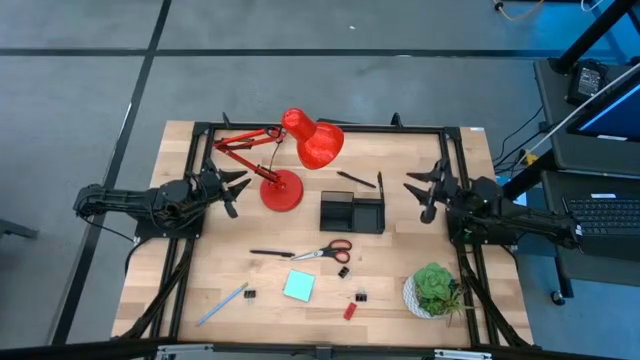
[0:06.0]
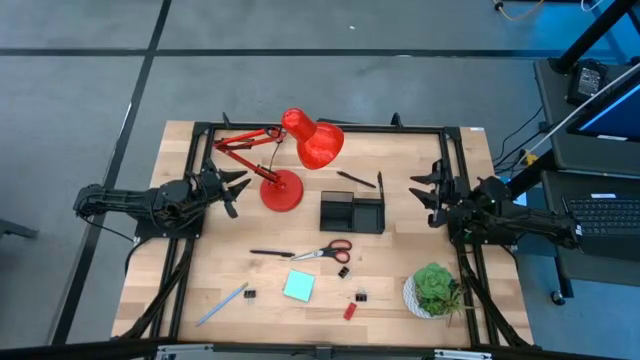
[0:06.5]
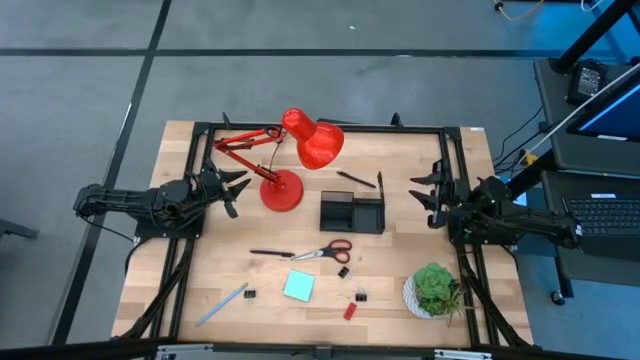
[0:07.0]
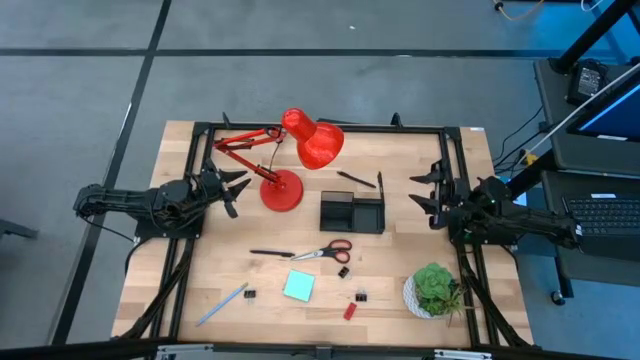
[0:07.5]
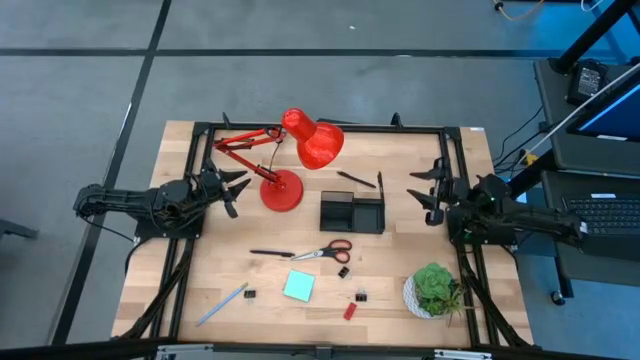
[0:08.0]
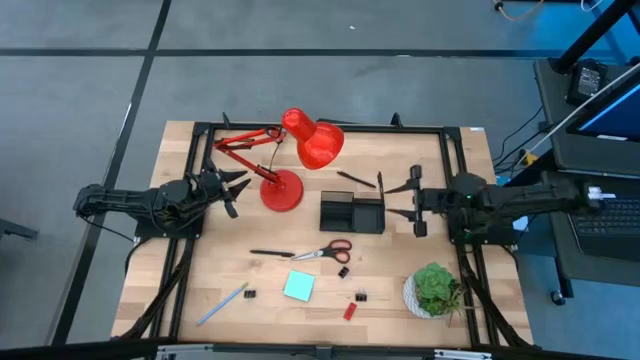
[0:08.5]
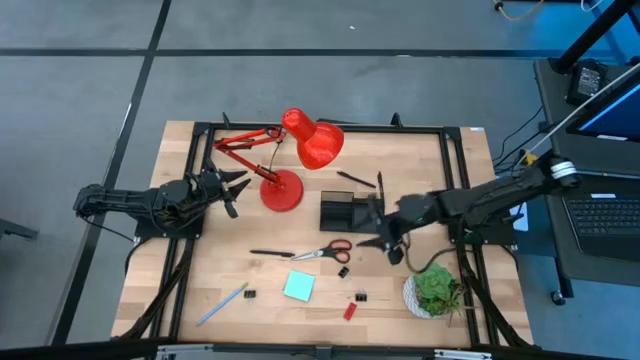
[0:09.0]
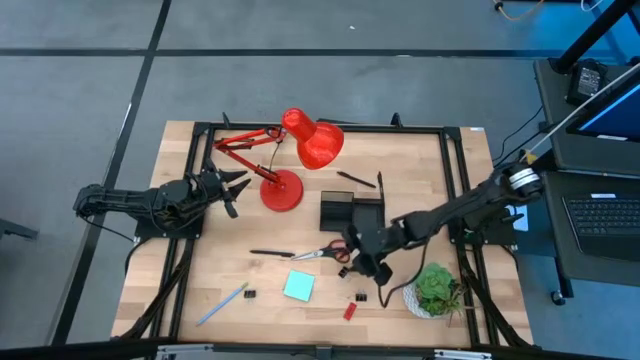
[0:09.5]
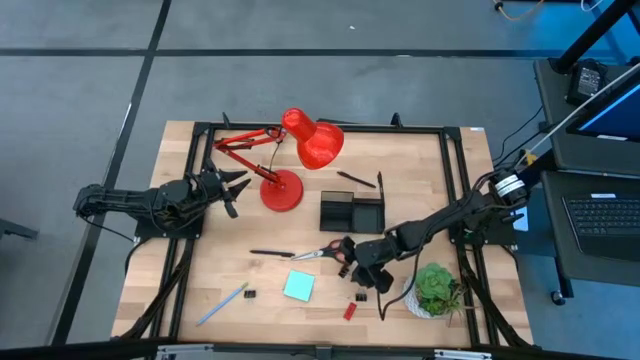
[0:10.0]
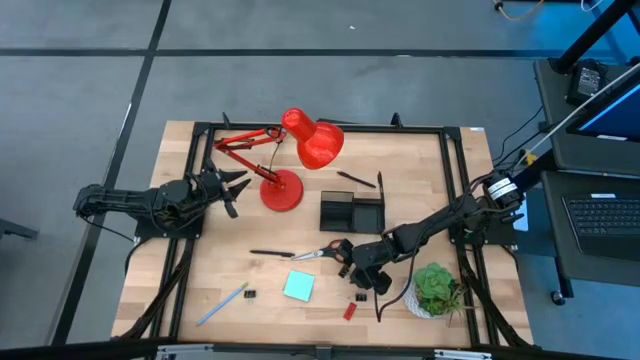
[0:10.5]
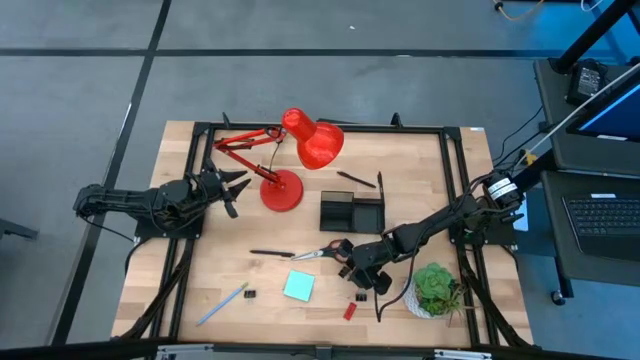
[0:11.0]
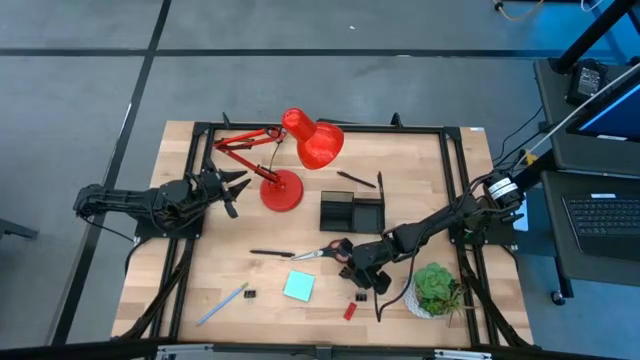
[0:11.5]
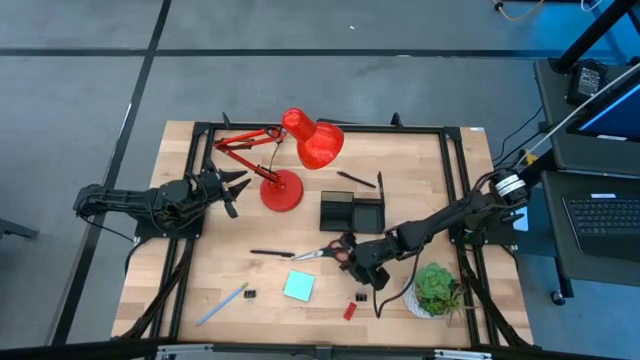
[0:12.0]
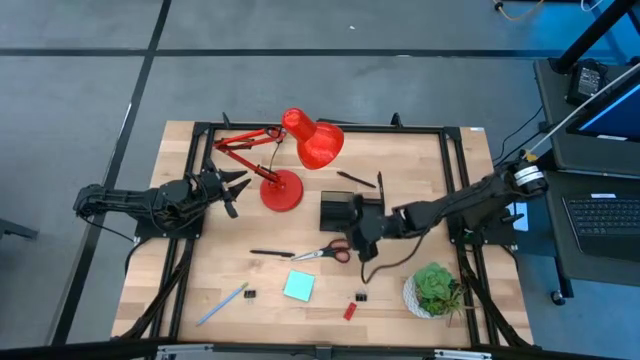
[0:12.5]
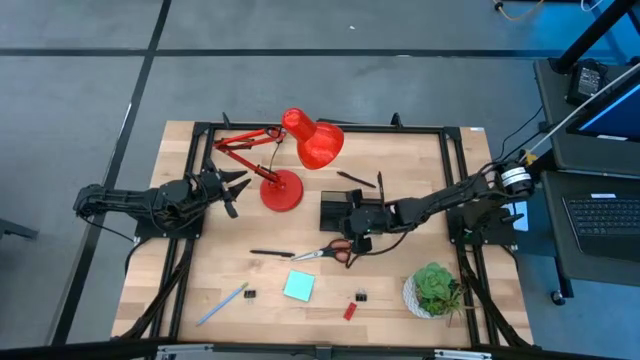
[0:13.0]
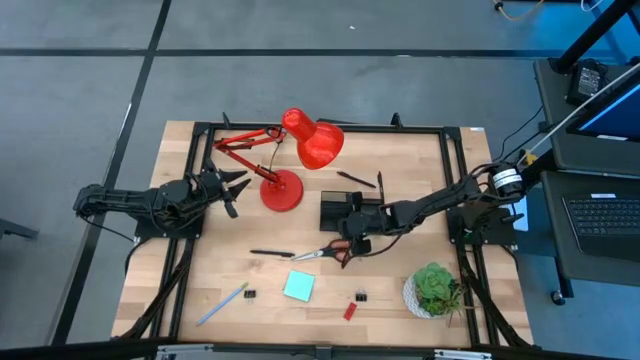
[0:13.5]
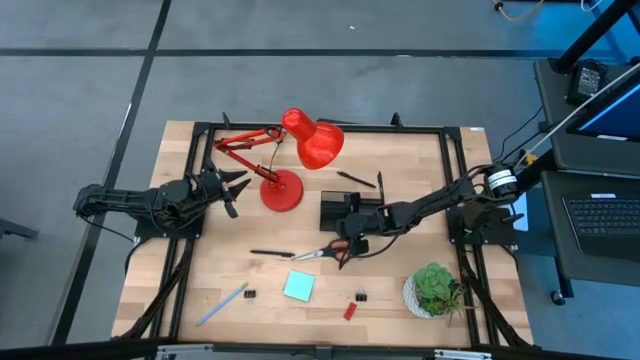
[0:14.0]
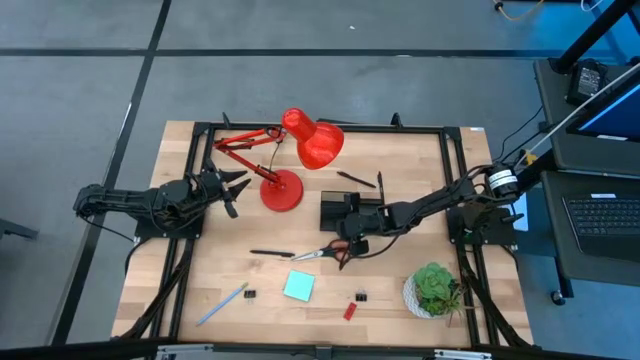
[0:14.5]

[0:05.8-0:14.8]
Task: Pick and place office supplies into organizer
Put the top left black binder clip into the black desk organizer

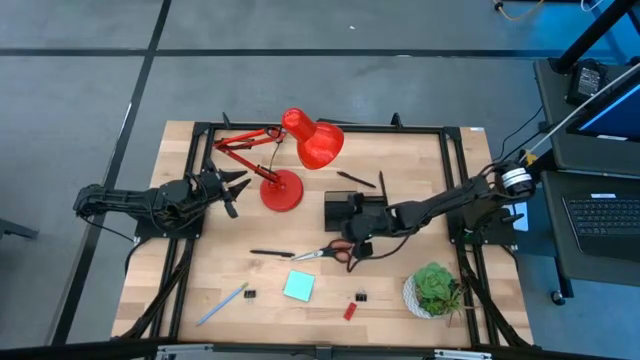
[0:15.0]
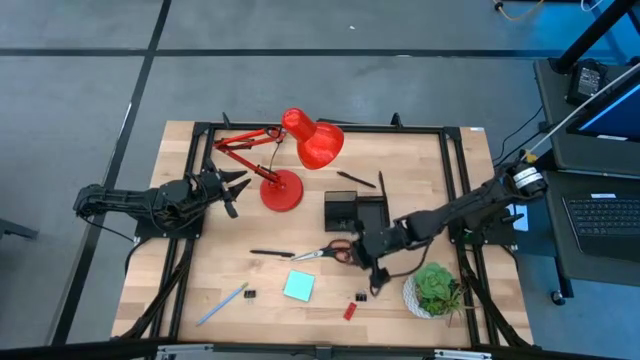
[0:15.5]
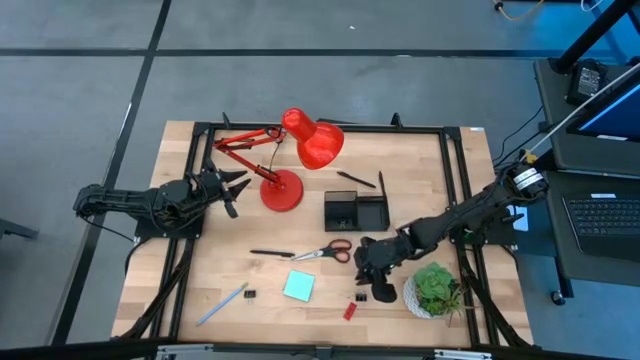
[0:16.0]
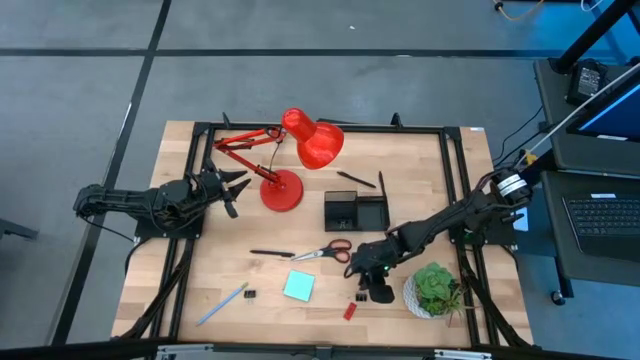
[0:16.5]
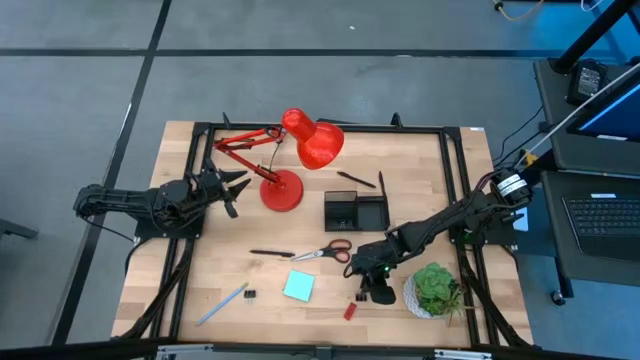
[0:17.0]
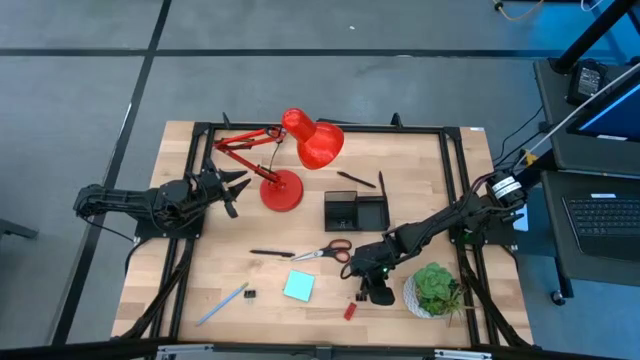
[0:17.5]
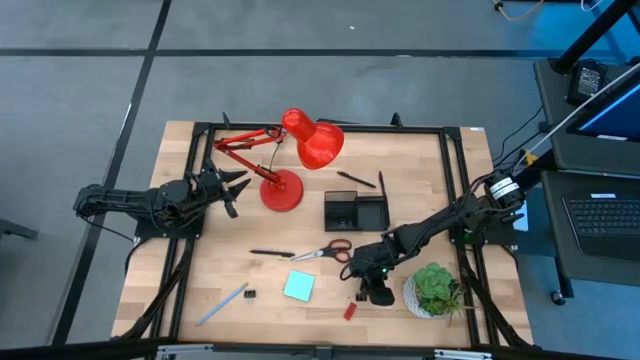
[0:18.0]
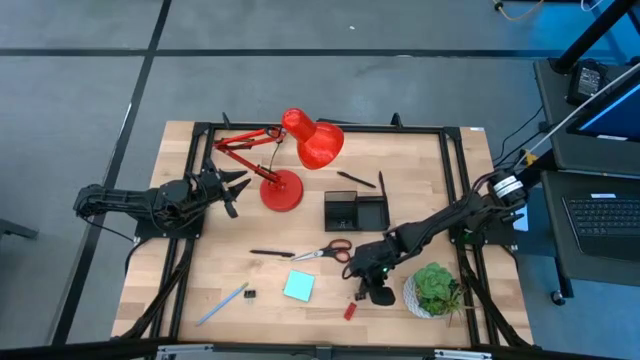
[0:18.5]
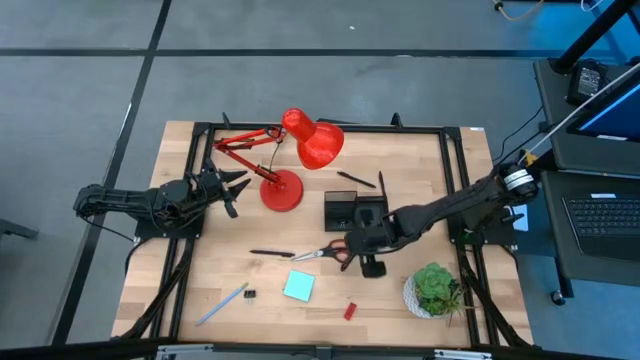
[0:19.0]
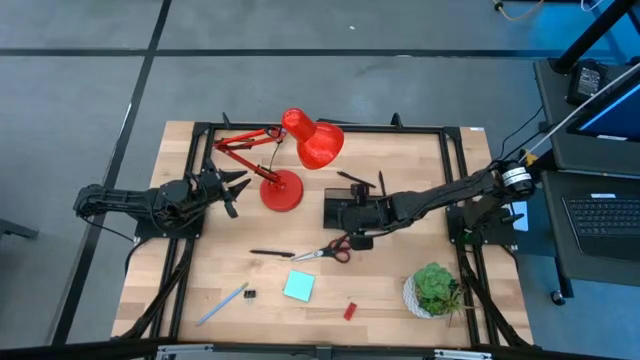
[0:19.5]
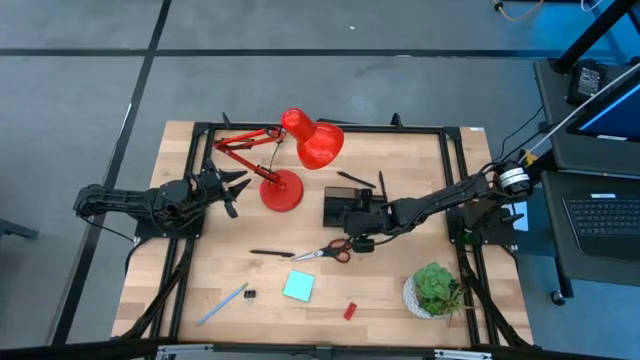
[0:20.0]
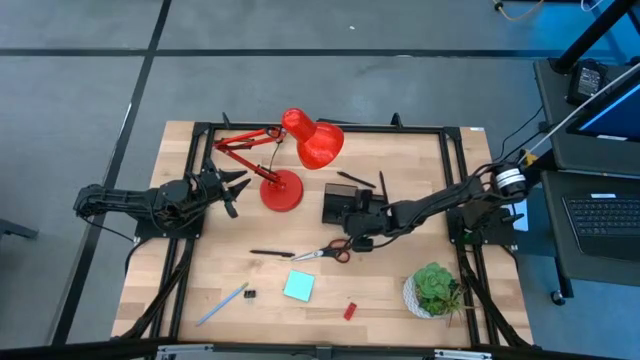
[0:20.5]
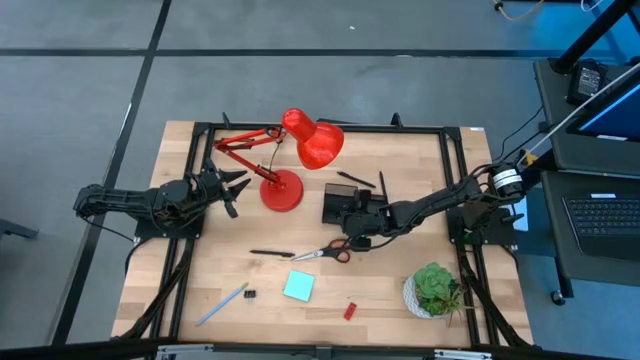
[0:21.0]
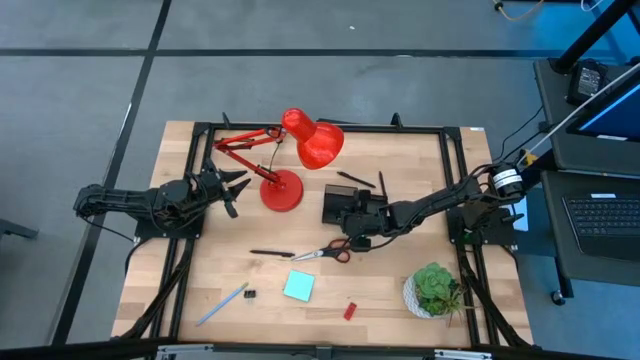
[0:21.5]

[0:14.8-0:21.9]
Put the right black binder clip into the black desk organizer

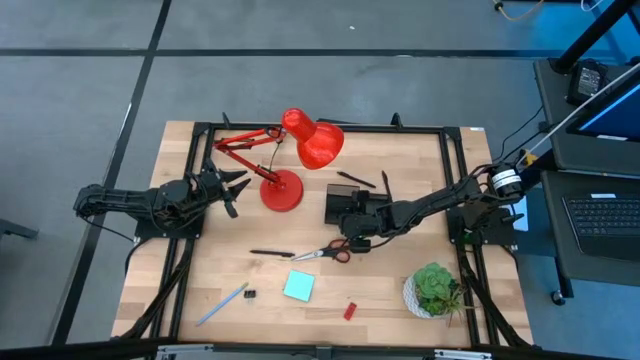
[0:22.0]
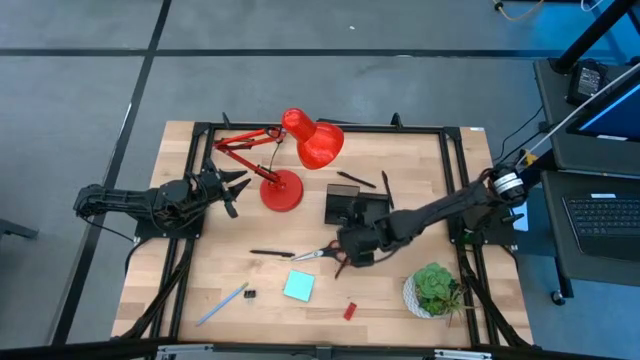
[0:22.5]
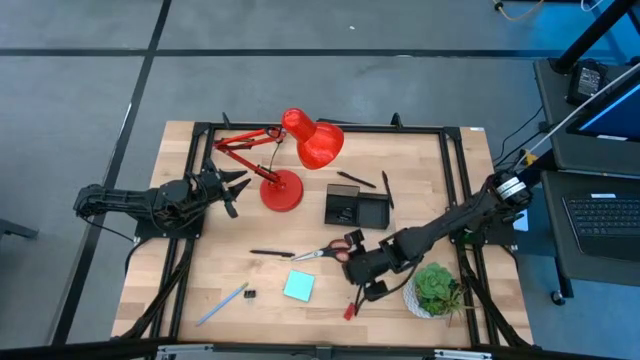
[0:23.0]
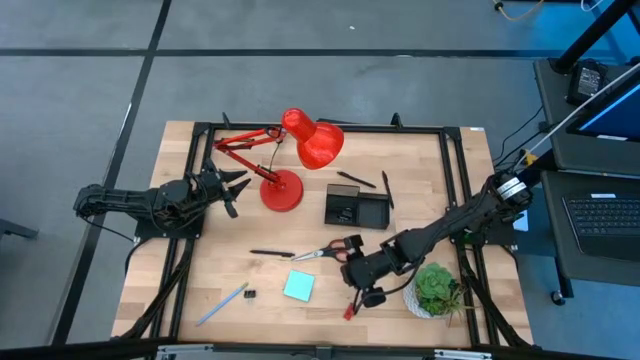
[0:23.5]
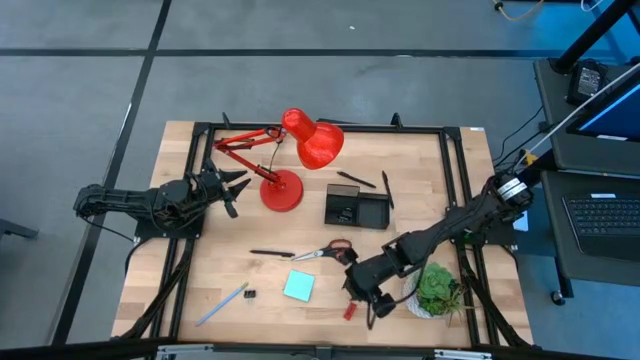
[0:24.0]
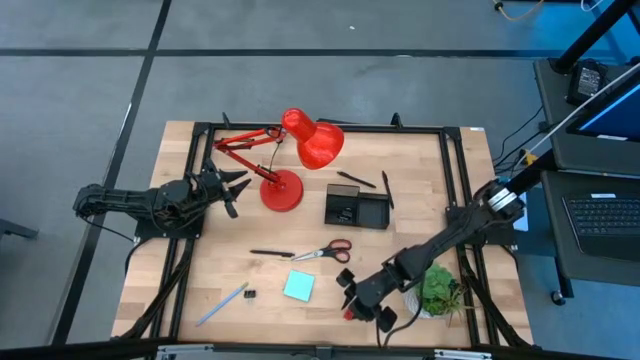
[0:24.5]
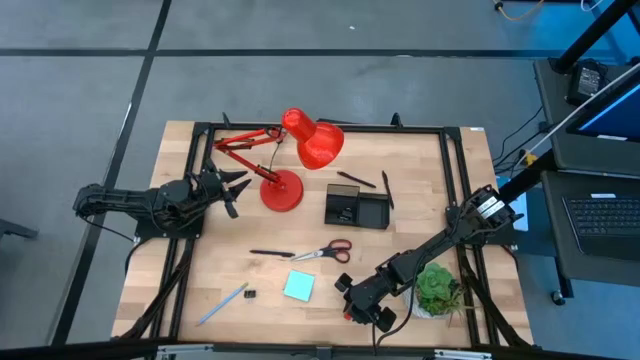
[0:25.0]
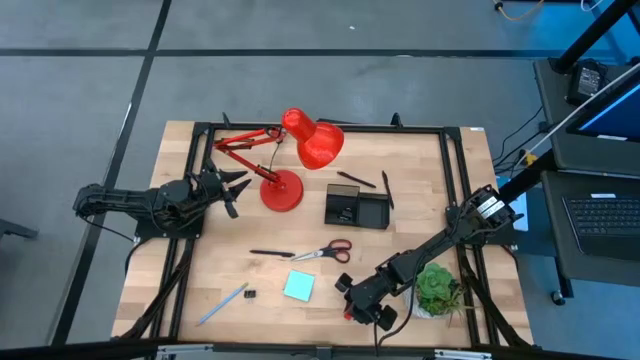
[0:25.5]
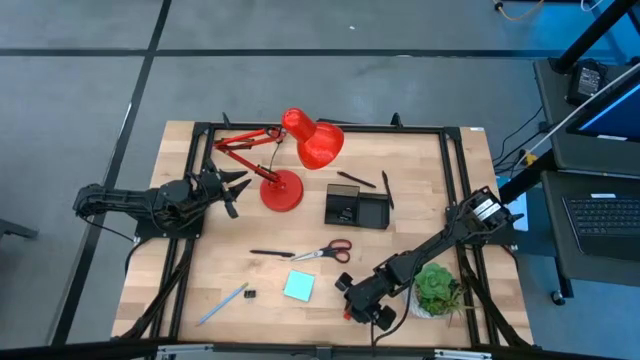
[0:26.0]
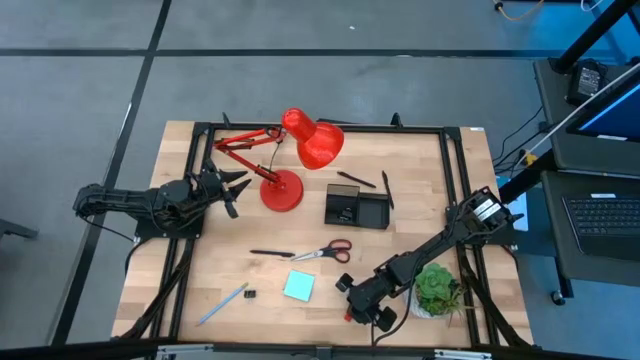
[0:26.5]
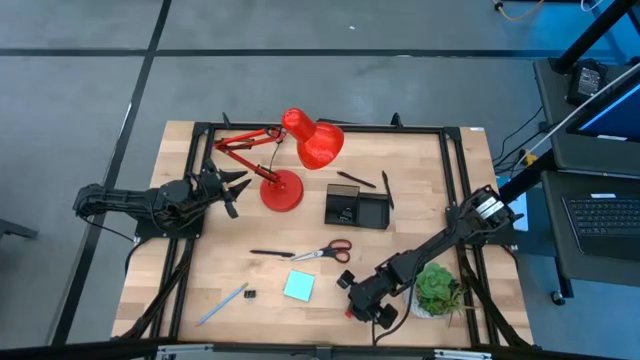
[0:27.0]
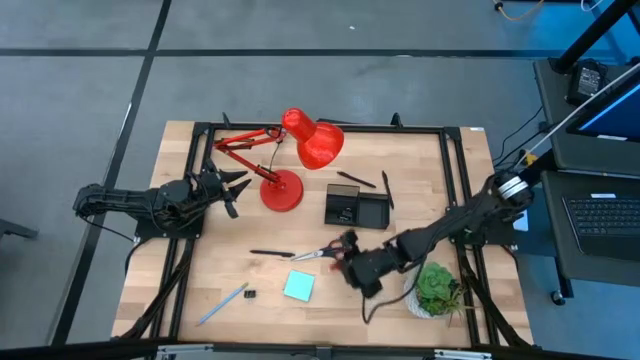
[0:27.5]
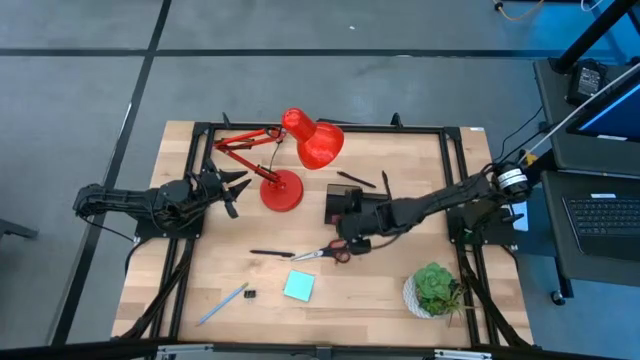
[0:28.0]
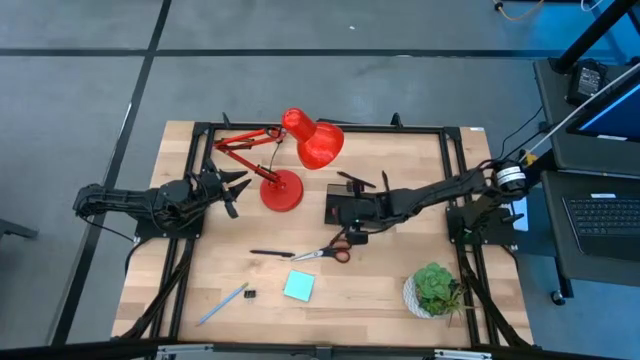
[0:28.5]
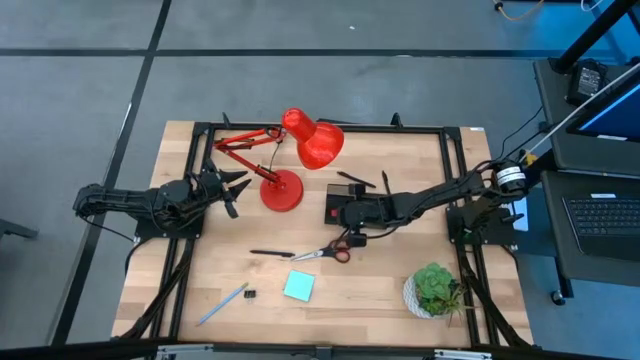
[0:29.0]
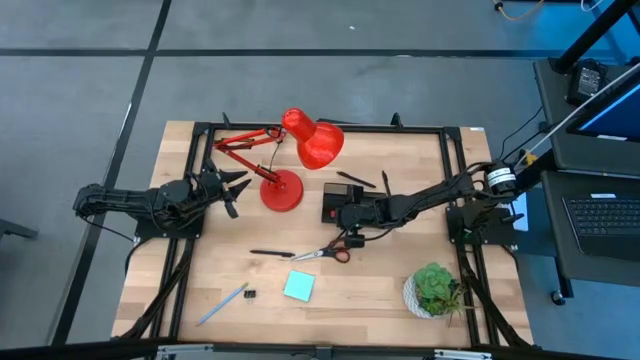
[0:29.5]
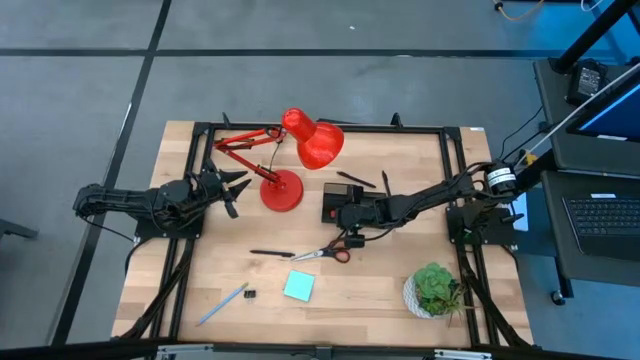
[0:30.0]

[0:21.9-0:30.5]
Put the red eraser into the black desk organizer
